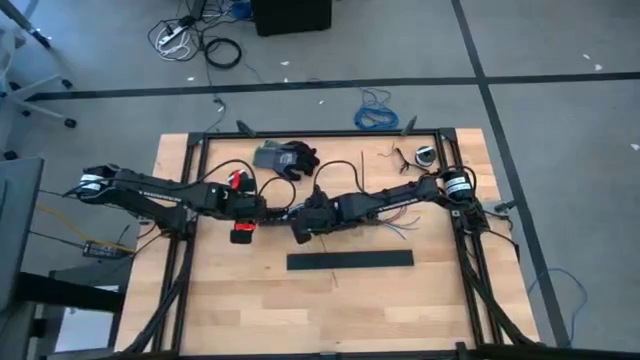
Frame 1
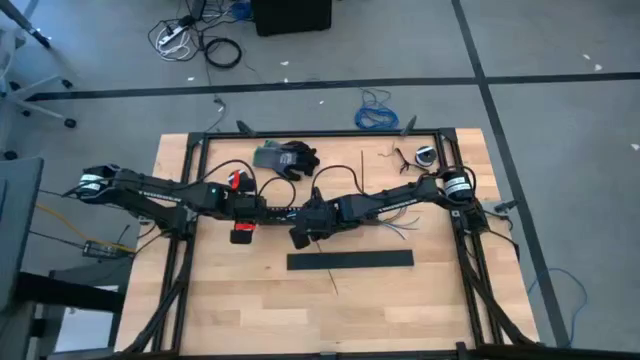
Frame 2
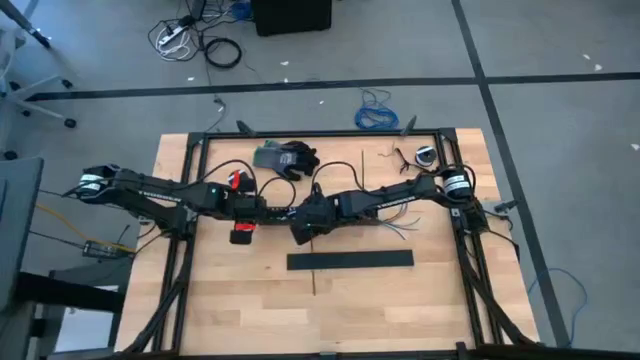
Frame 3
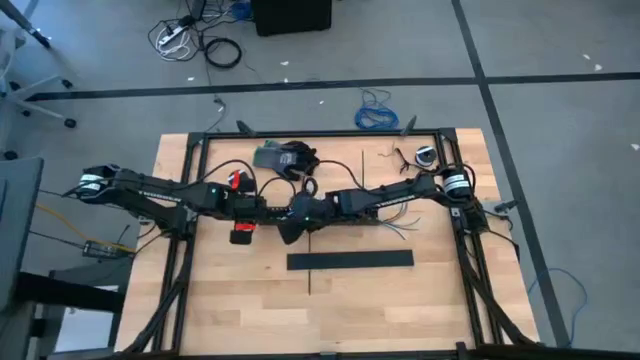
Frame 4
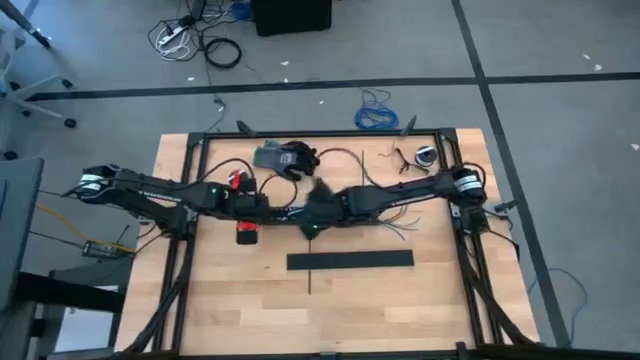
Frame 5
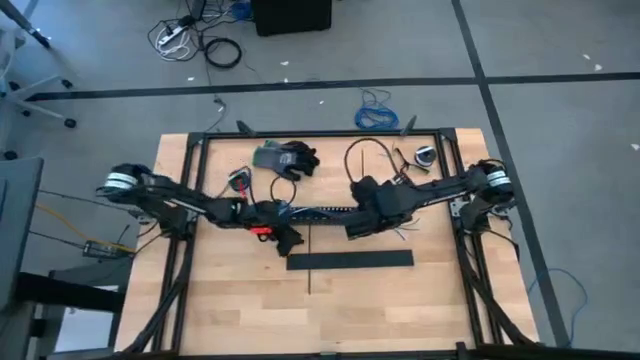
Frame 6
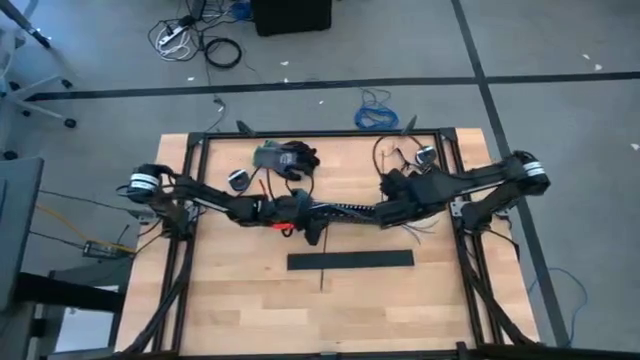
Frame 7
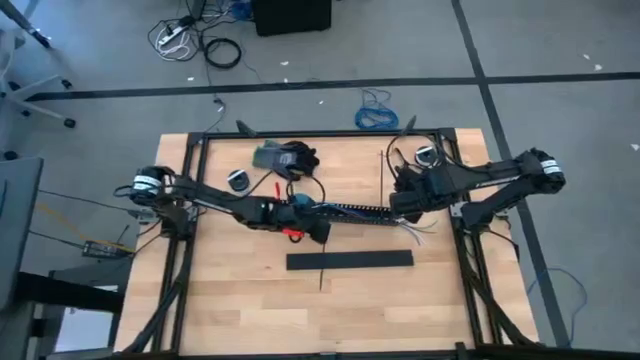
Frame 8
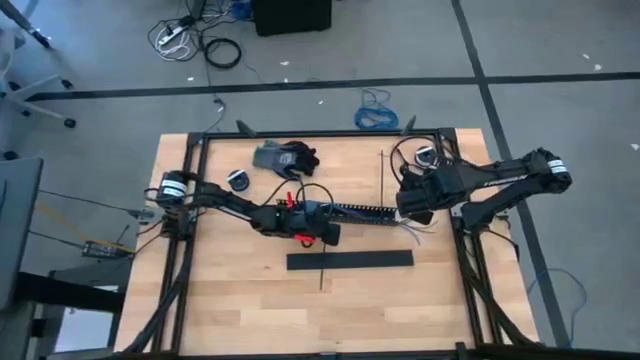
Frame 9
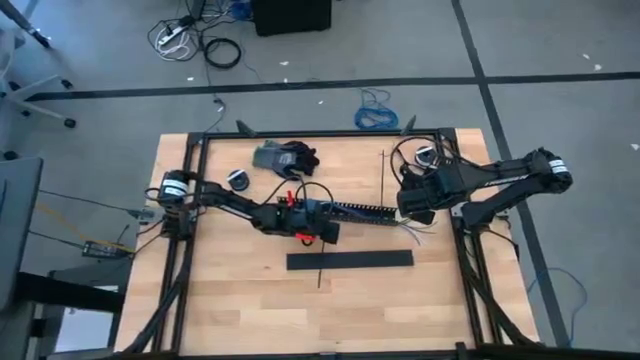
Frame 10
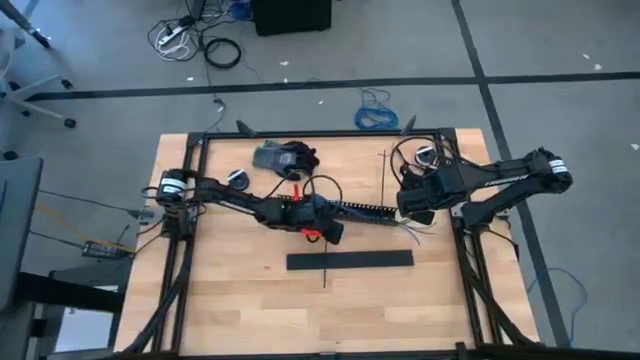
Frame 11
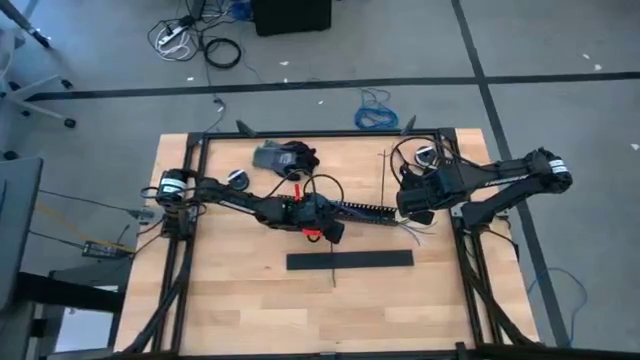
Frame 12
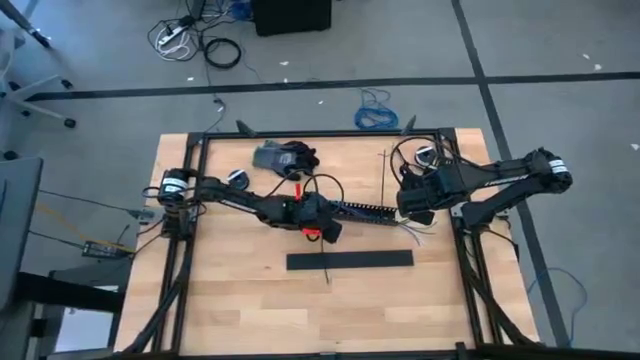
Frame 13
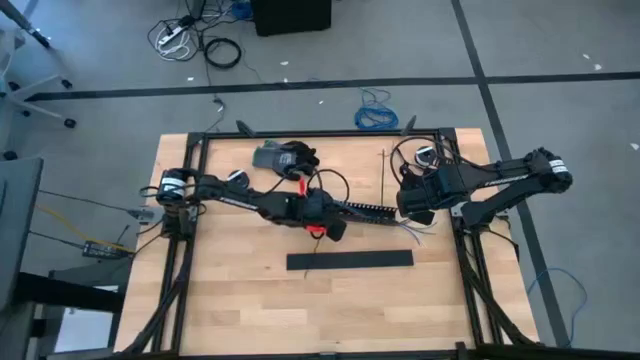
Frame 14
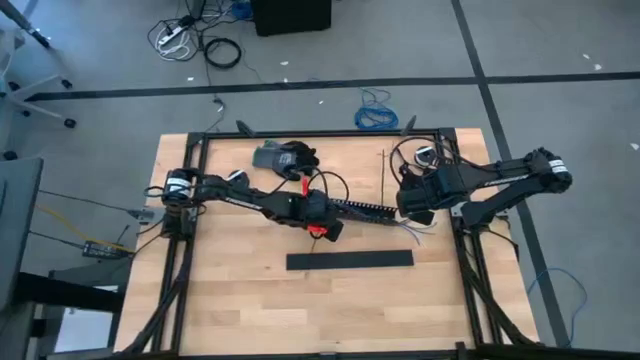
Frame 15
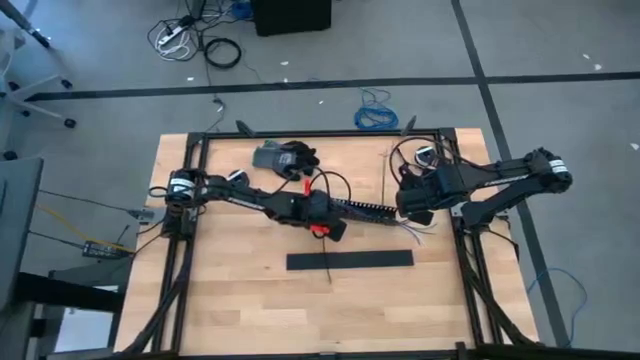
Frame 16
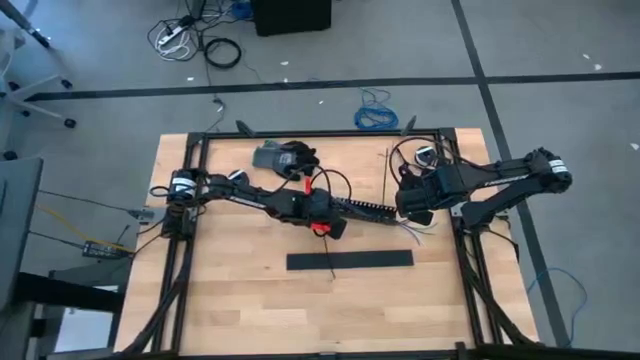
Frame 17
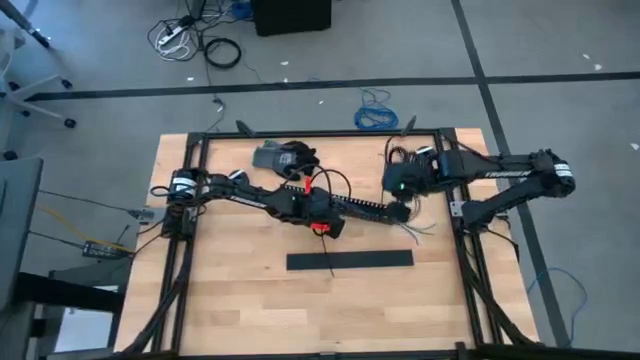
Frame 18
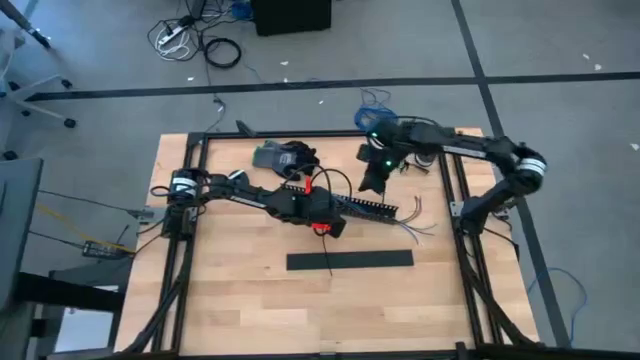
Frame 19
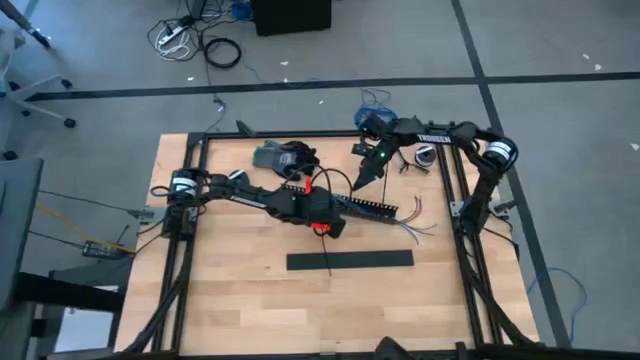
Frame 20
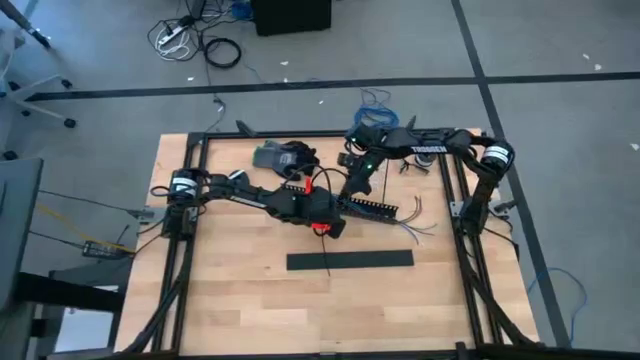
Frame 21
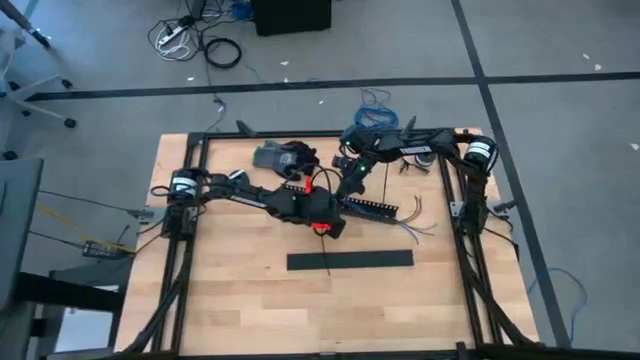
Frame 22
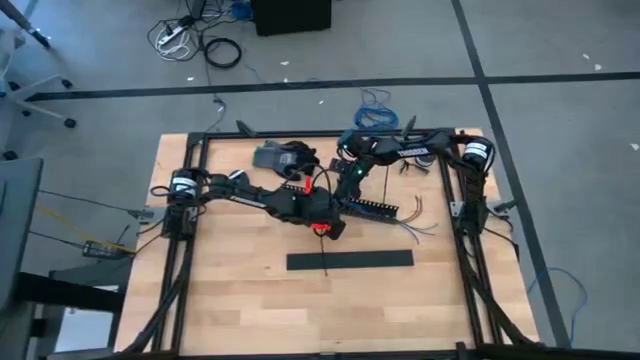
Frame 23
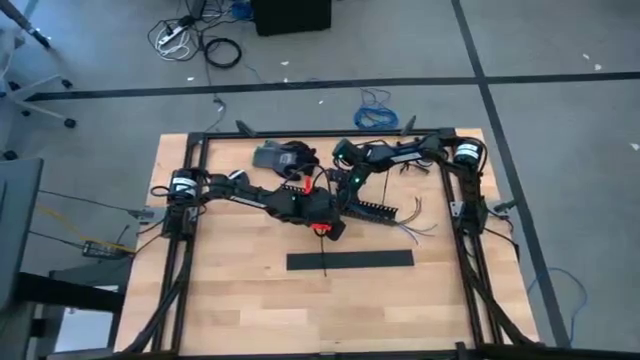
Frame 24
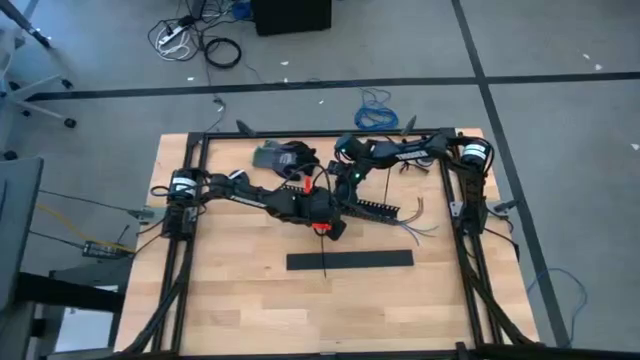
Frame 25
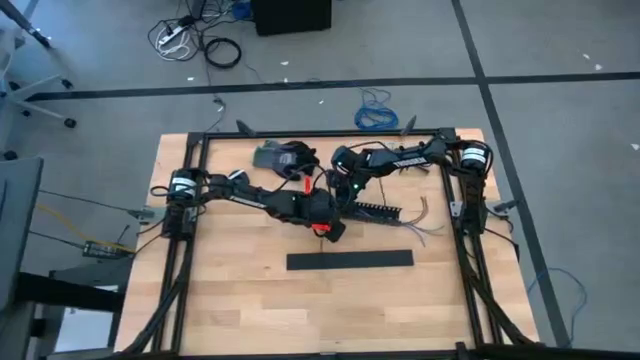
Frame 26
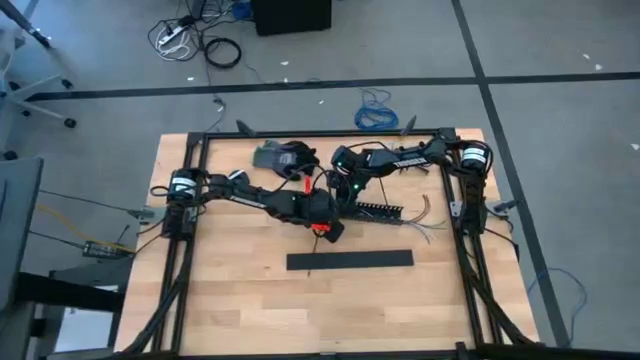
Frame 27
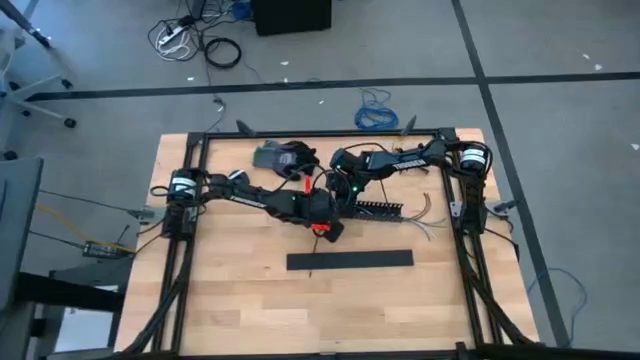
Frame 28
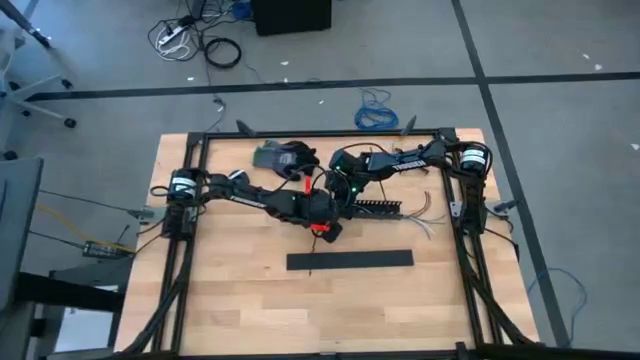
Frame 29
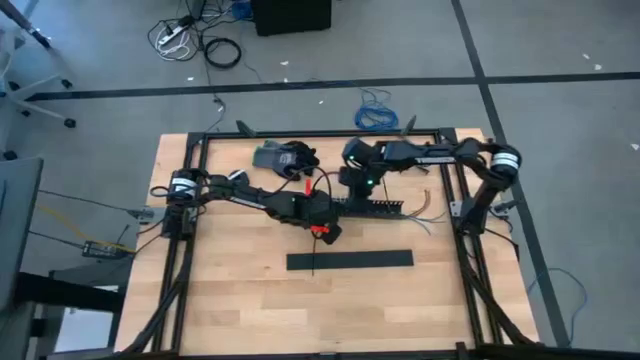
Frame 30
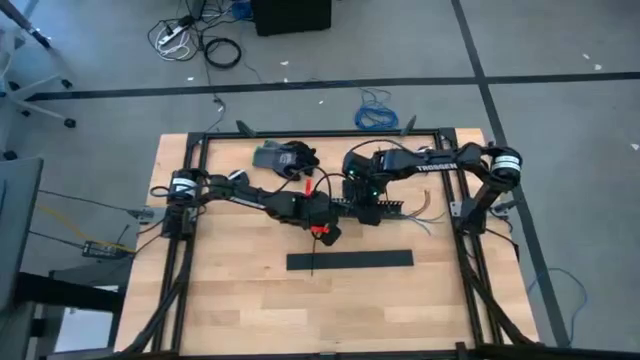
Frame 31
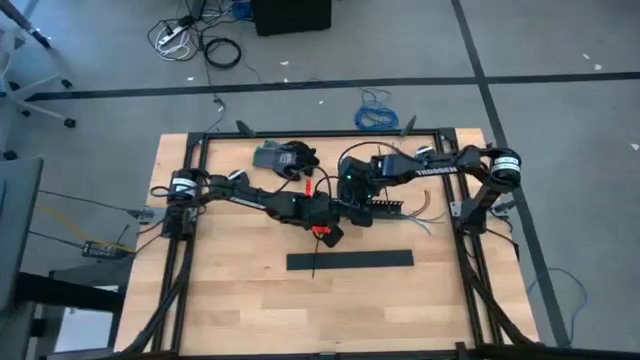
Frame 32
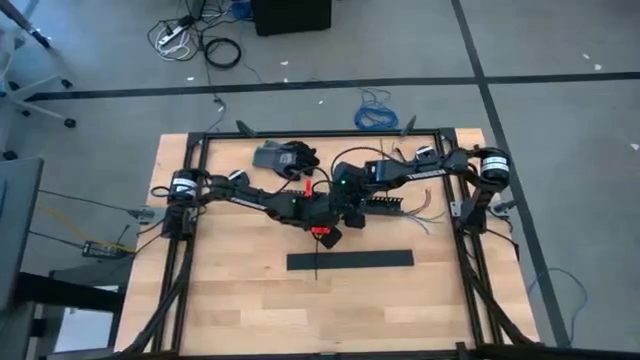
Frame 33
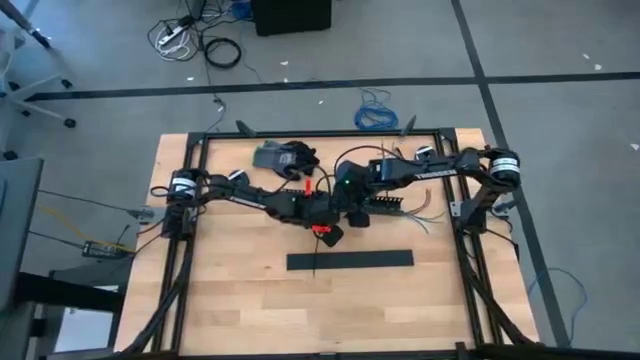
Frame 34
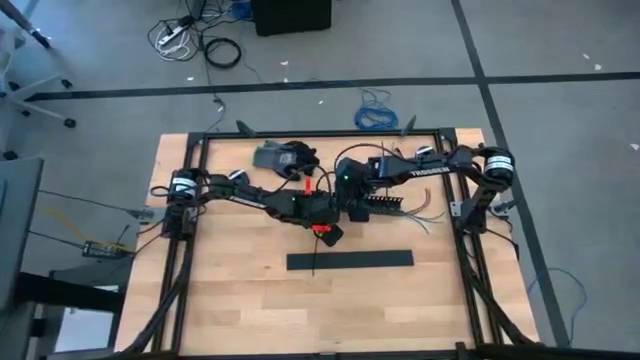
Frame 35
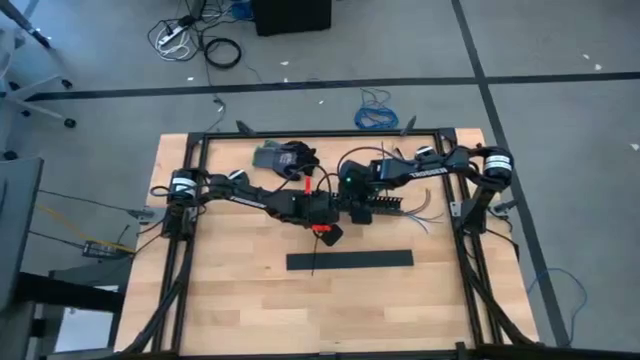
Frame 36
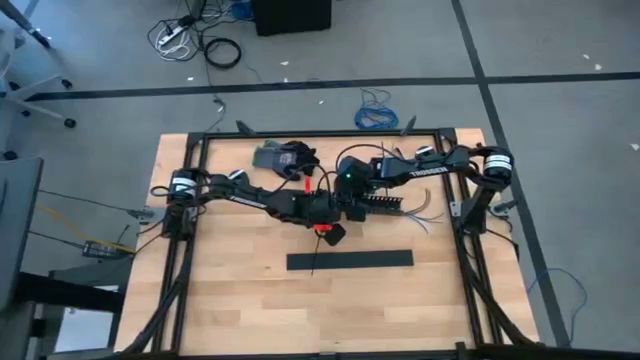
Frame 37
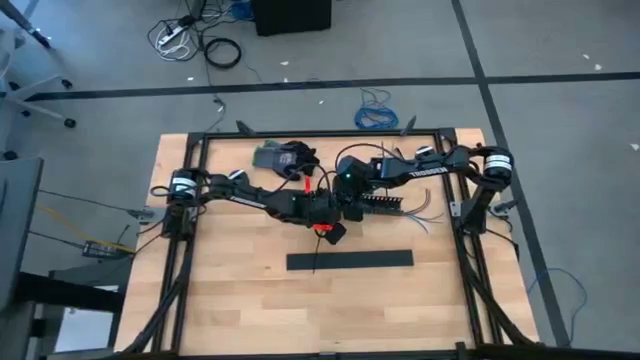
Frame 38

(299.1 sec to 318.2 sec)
Task: Ziptie cables
Put the ziptied wire cables into the black cable duct
